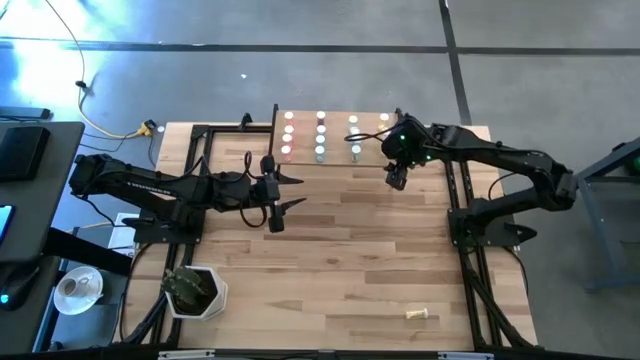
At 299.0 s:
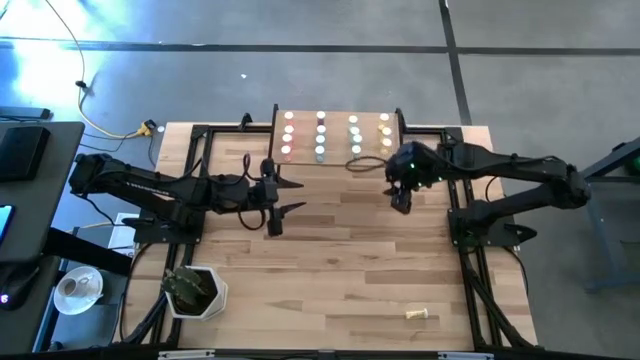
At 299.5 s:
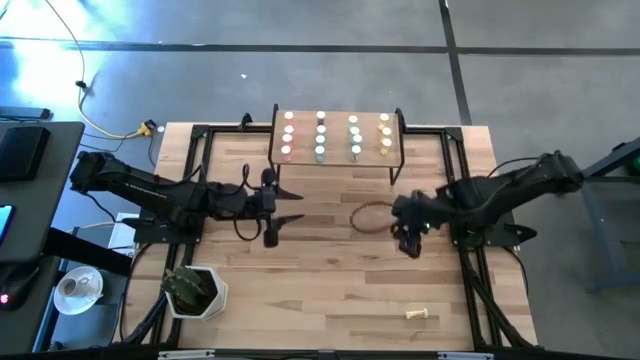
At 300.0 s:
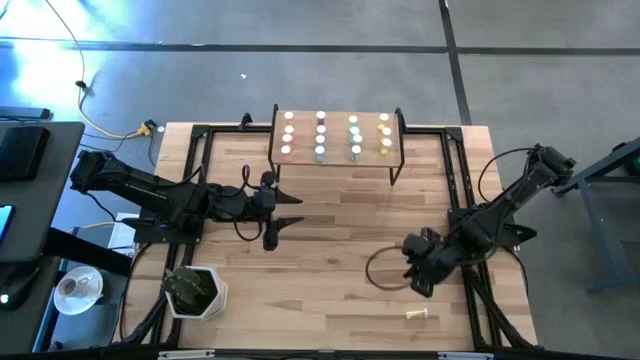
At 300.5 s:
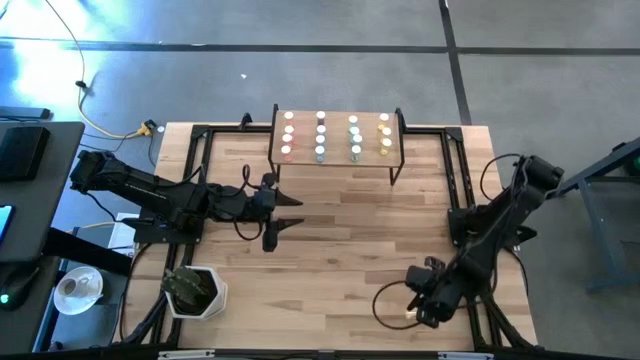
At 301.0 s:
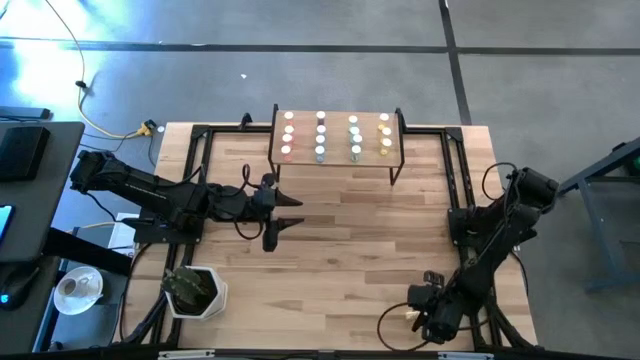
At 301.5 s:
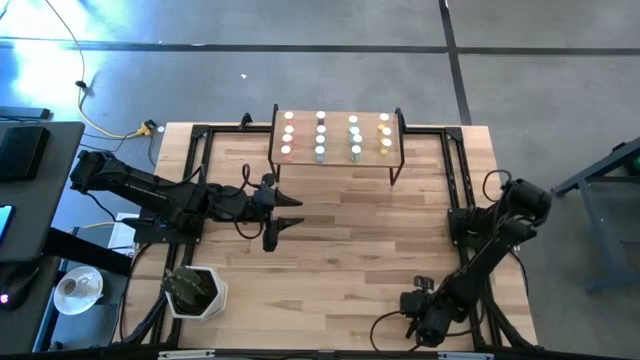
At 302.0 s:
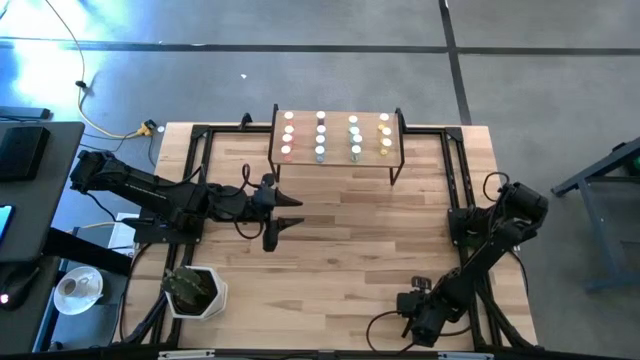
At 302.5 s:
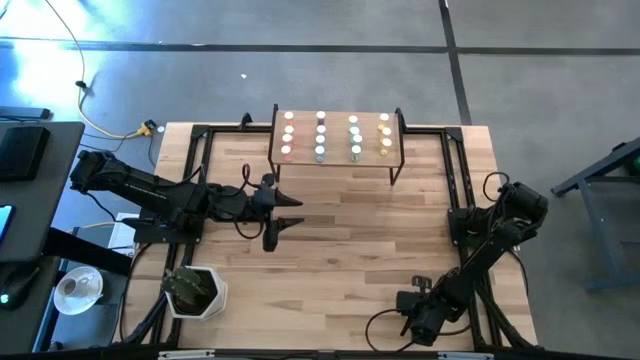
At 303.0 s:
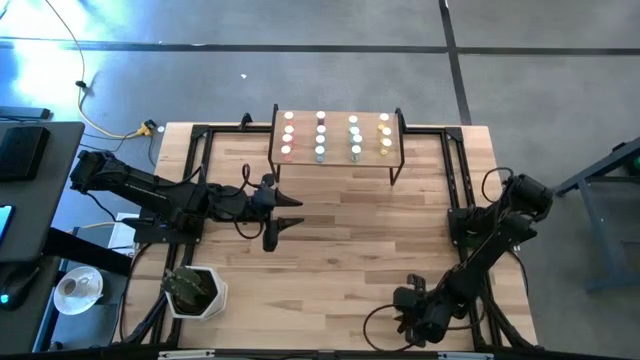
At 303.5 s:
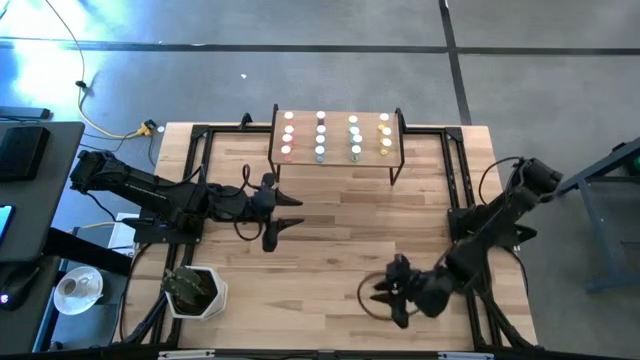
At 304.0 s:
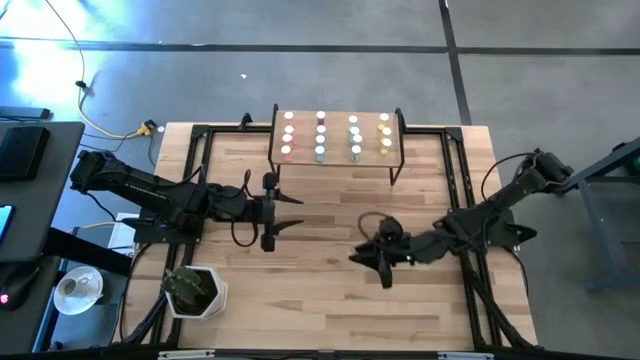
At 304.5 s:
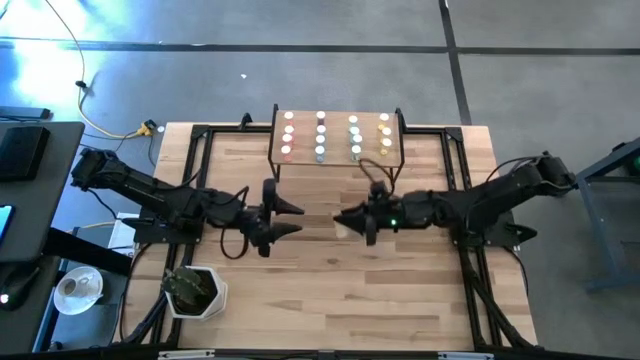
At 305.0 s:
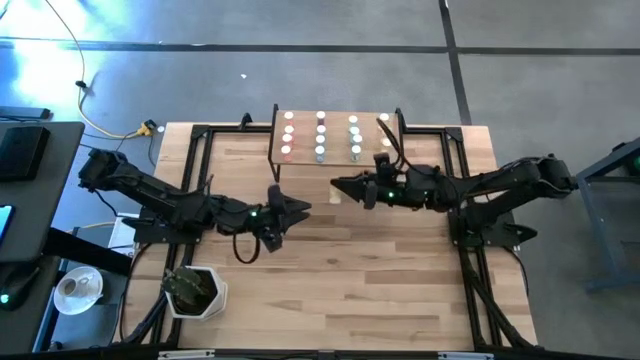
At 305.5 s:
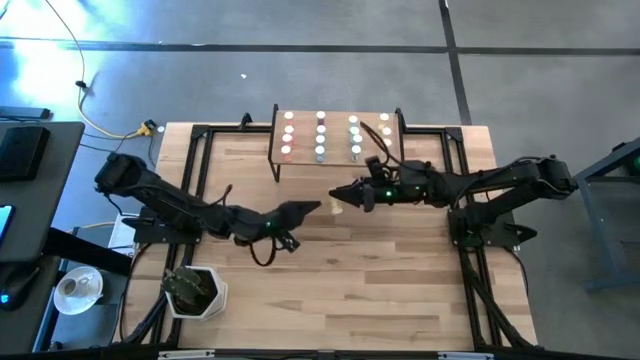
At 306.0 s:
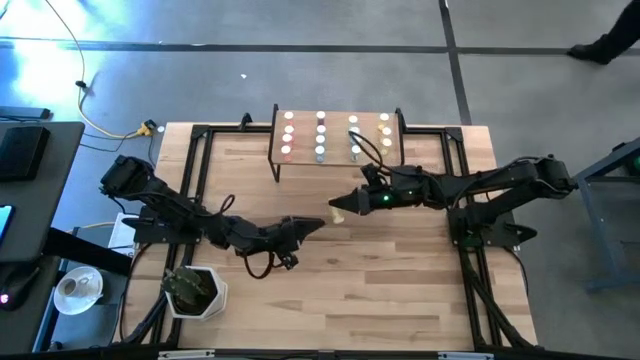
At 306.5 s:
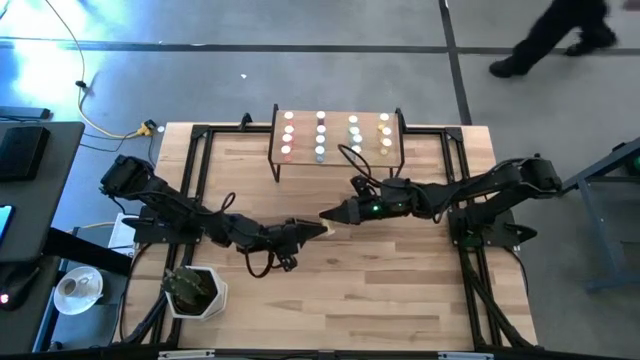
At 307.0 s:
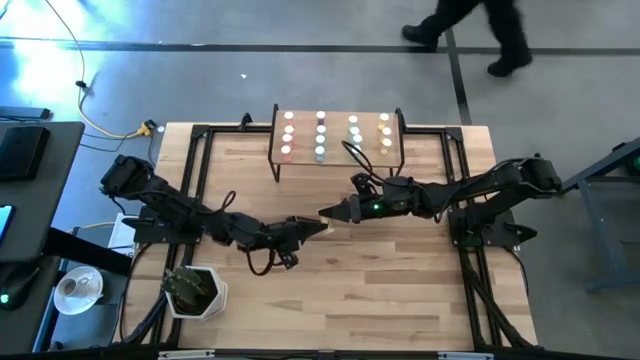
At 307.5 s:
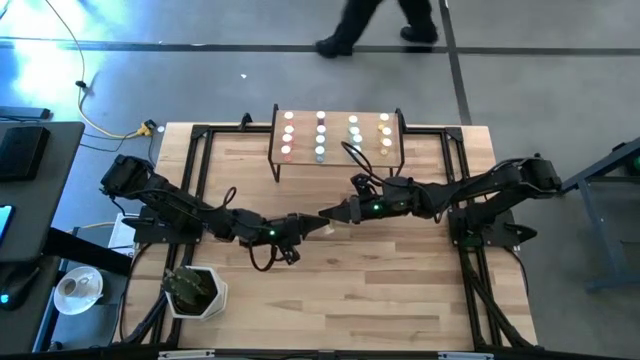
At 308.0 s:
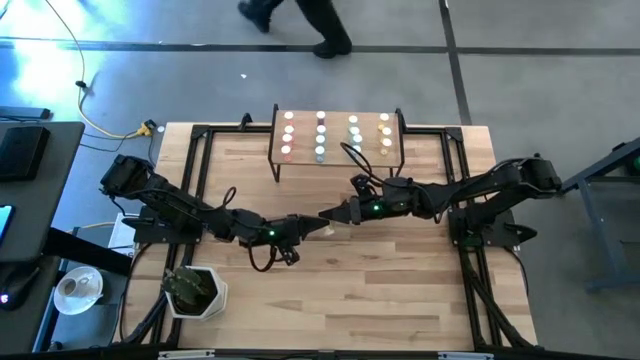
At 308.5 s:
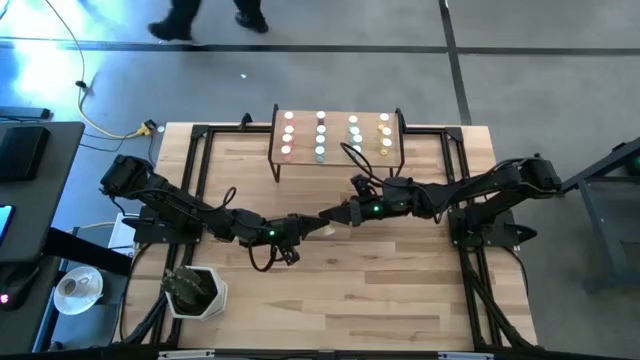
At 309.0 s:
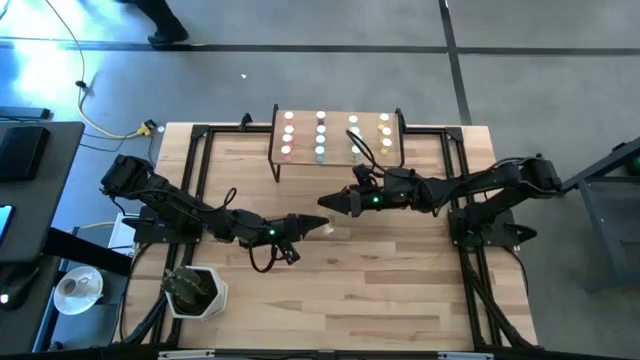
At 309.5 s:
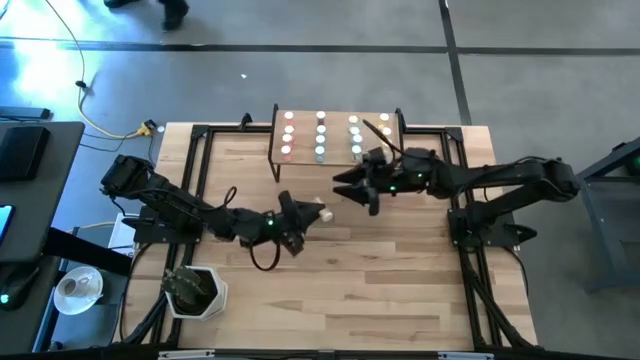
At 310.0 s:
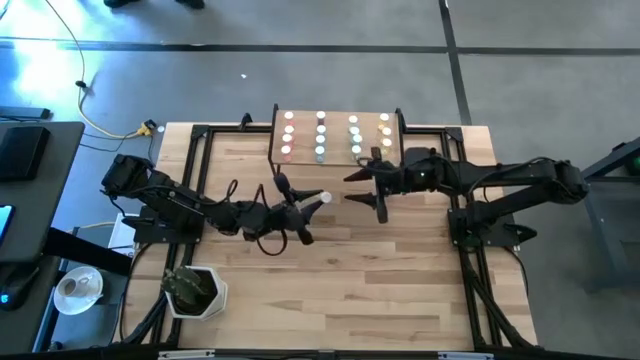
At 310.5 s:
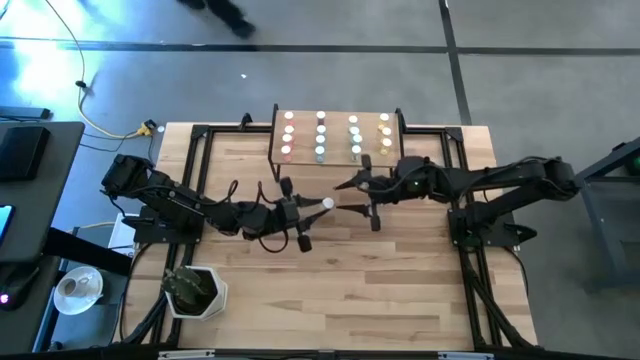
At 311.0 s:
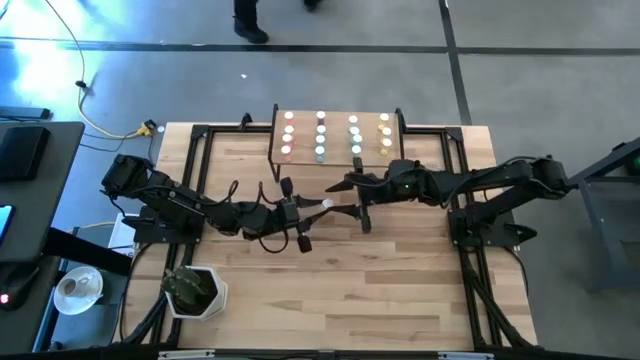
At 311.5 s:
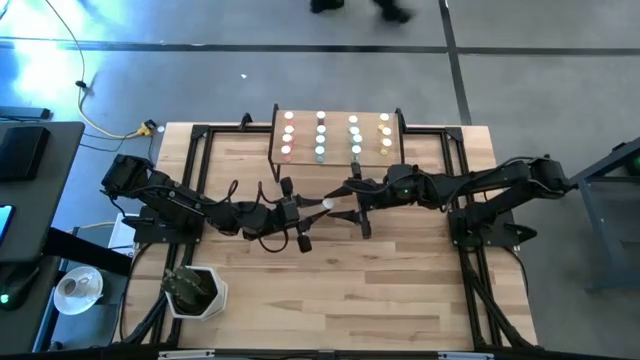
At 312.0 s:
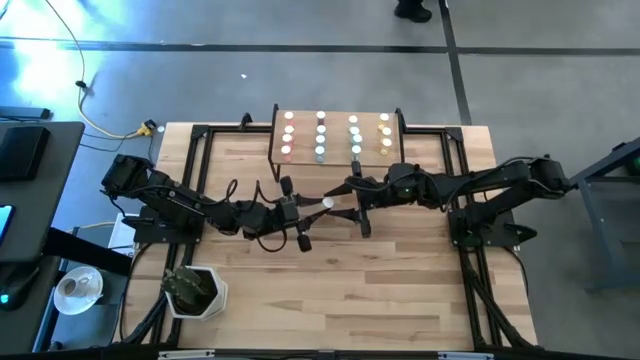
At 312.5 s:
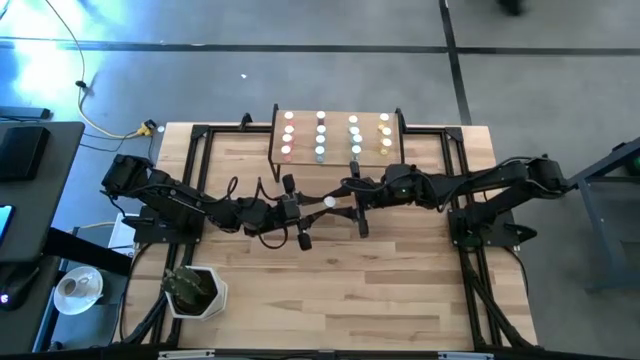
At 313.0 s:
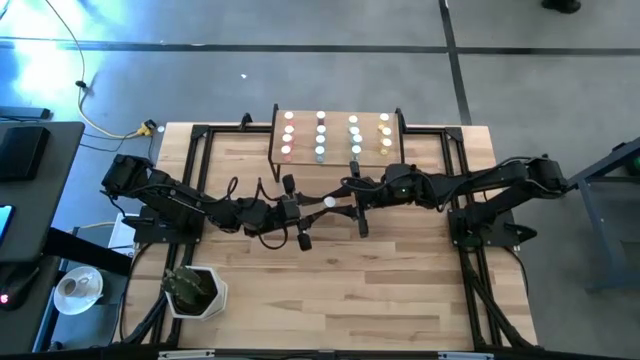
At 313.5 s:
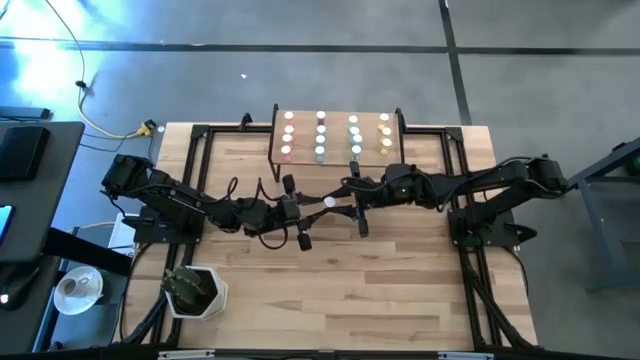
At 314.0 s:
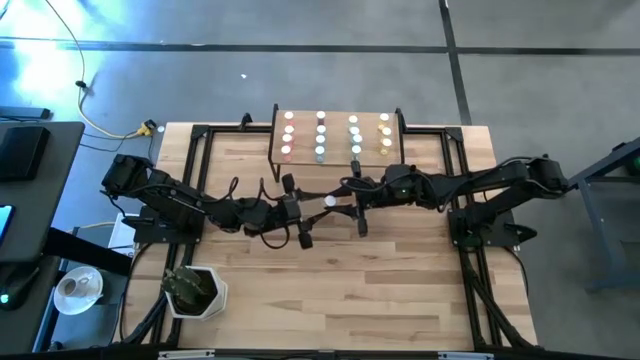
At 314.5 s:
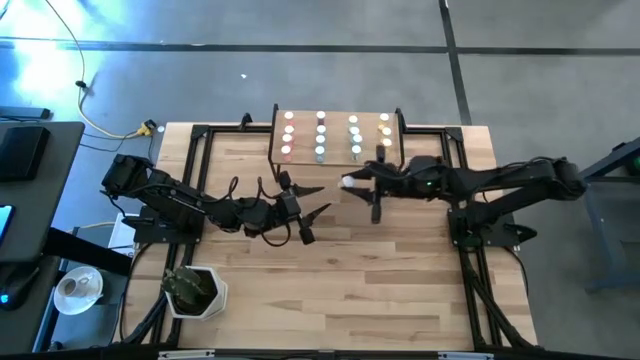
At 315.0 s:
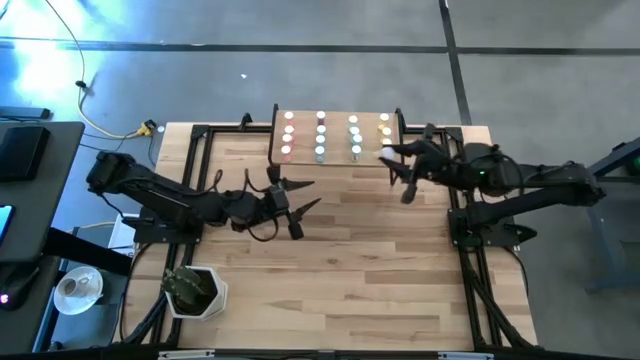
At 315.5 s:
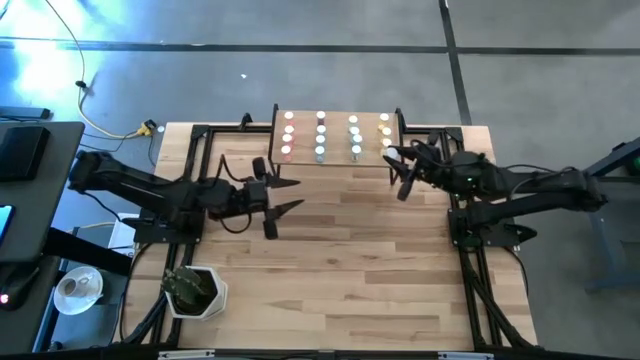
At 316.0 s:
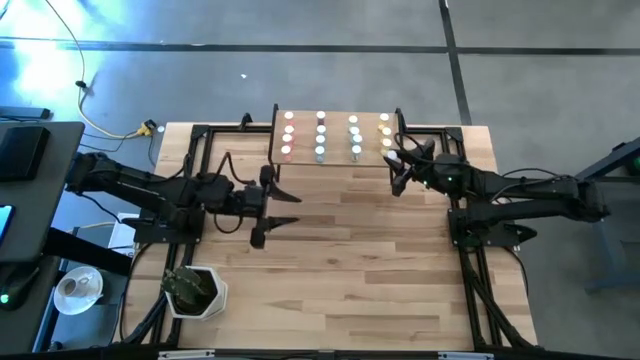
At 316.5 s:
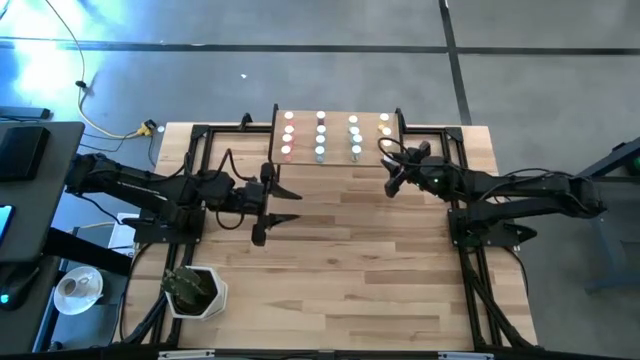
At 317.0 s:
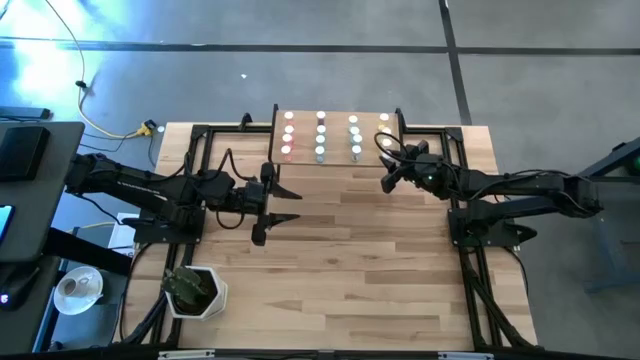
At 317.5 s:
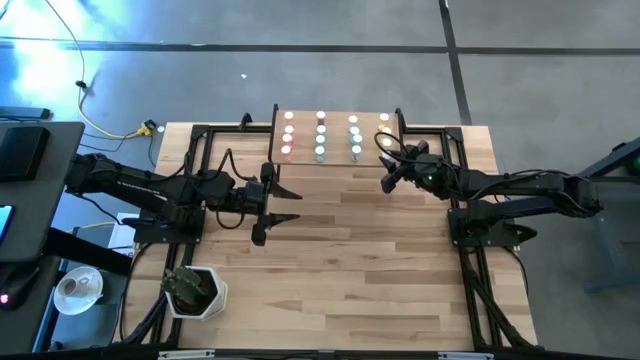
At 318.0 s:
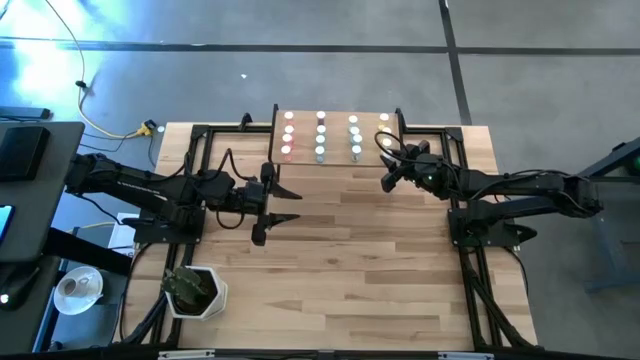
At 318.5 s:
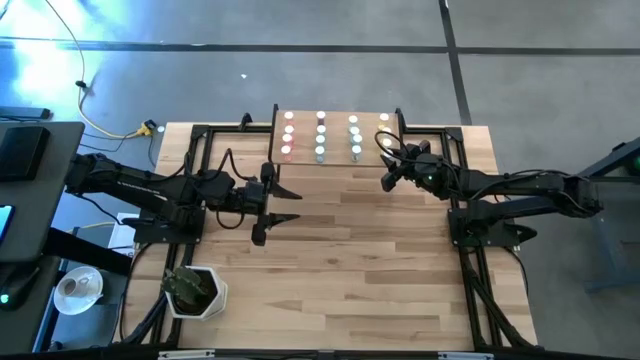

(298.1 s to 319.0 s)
Task: Pick and place medicine bottles onto shelf by color
Put the yellow pill bottle on the shelf aligned with the other yellow pill bottles
